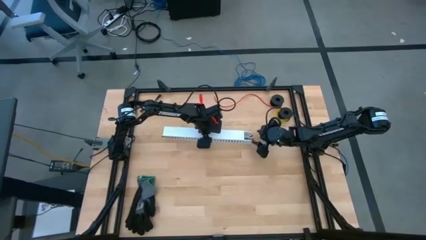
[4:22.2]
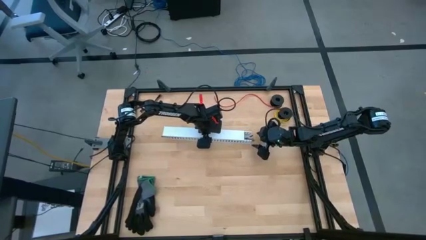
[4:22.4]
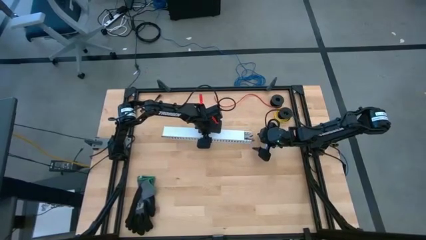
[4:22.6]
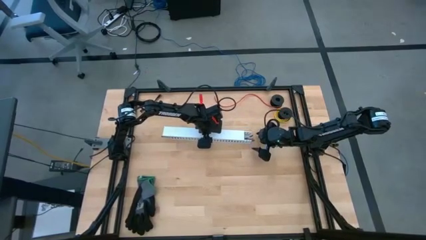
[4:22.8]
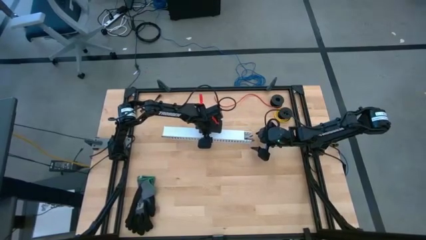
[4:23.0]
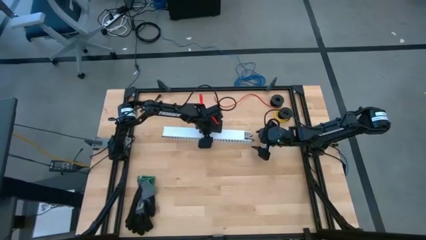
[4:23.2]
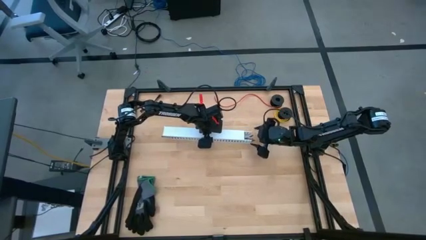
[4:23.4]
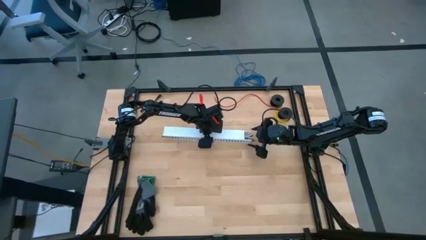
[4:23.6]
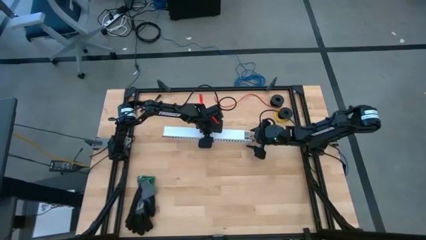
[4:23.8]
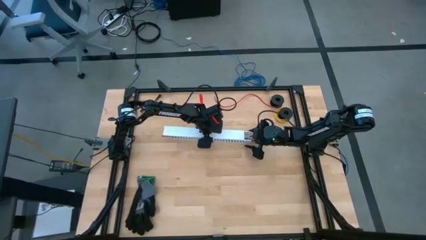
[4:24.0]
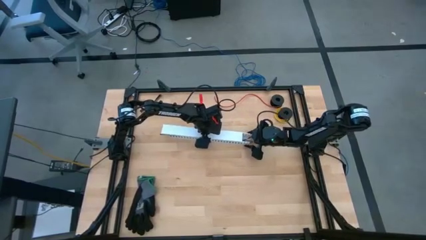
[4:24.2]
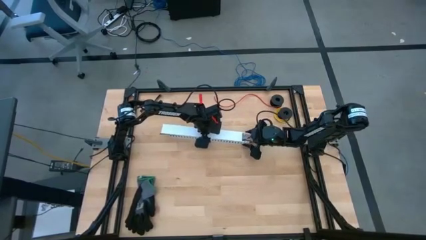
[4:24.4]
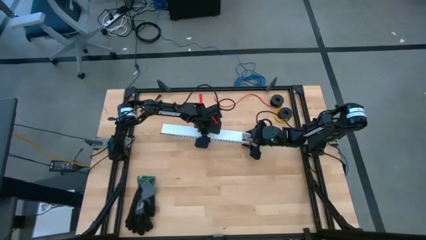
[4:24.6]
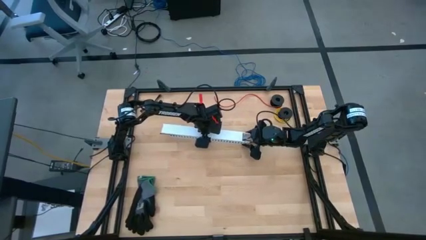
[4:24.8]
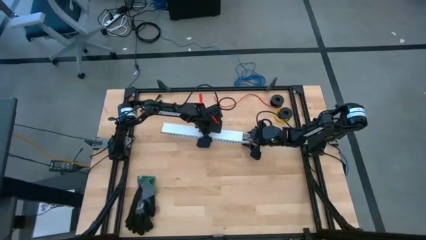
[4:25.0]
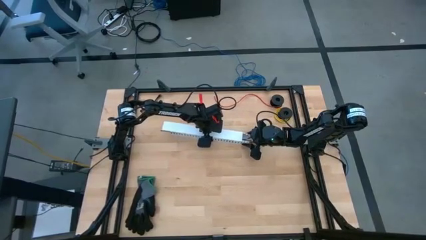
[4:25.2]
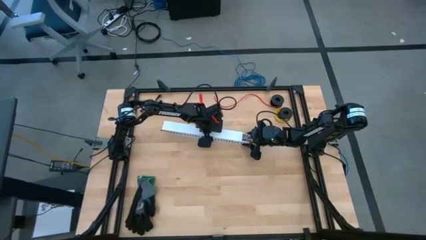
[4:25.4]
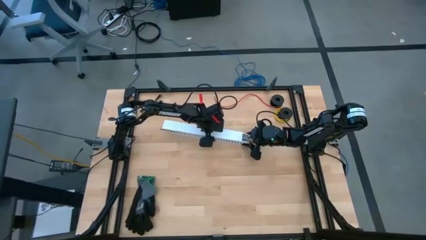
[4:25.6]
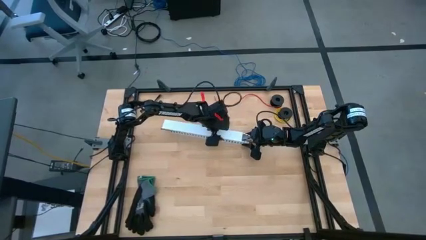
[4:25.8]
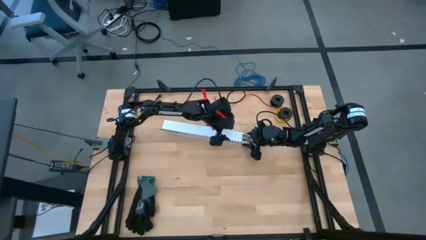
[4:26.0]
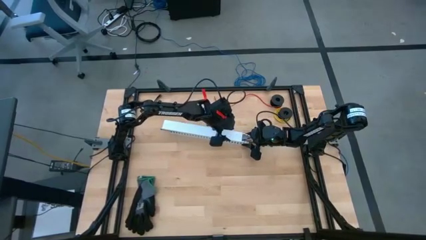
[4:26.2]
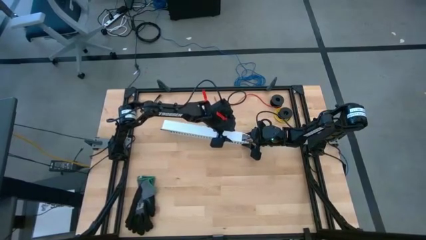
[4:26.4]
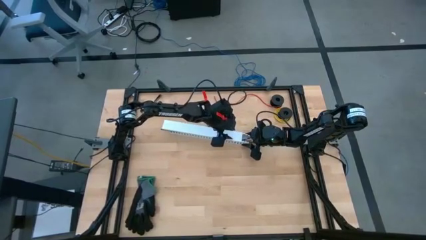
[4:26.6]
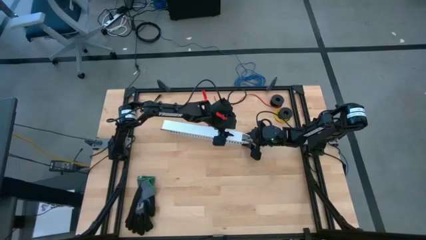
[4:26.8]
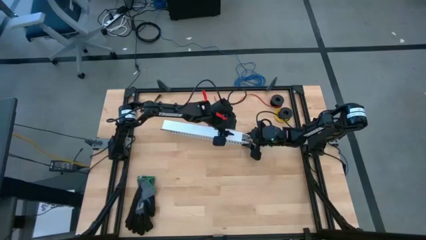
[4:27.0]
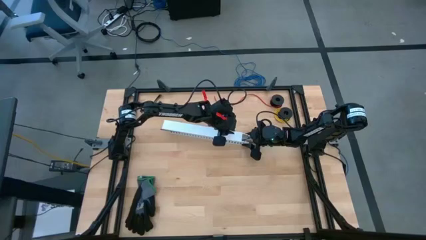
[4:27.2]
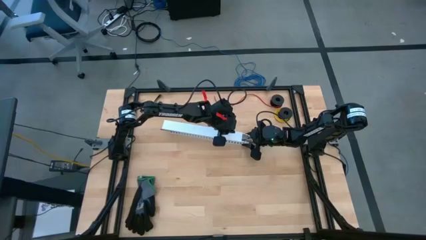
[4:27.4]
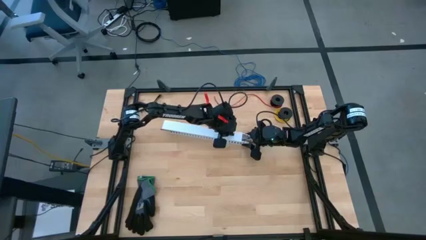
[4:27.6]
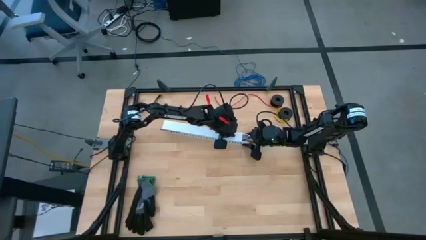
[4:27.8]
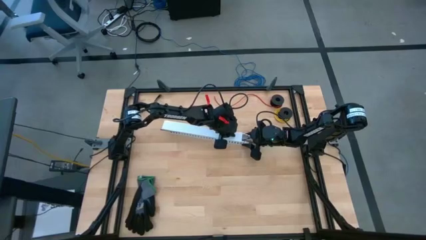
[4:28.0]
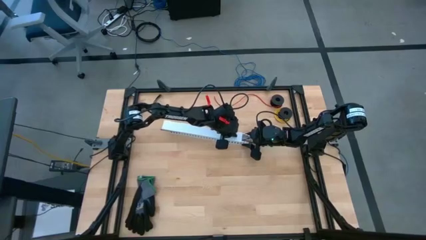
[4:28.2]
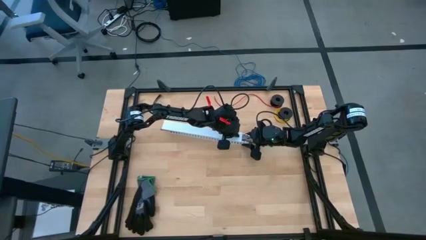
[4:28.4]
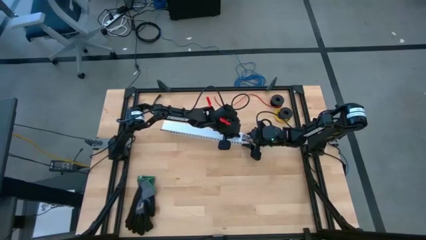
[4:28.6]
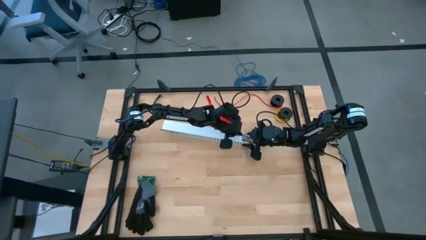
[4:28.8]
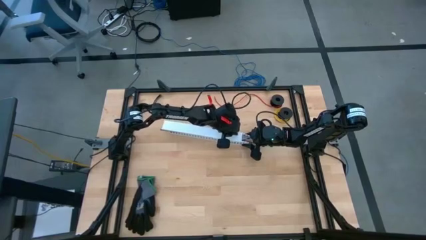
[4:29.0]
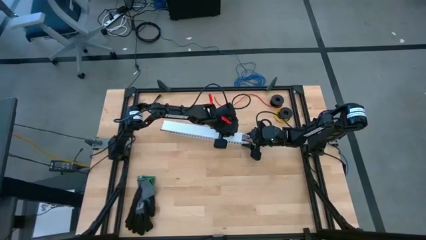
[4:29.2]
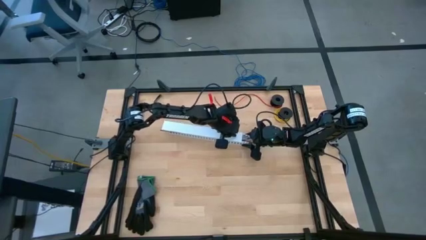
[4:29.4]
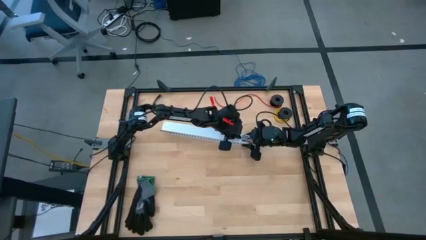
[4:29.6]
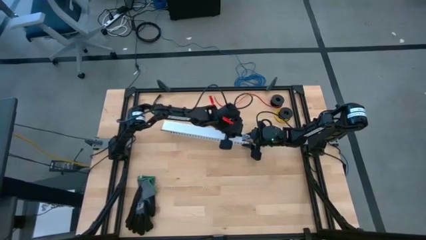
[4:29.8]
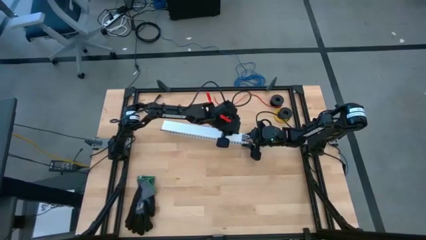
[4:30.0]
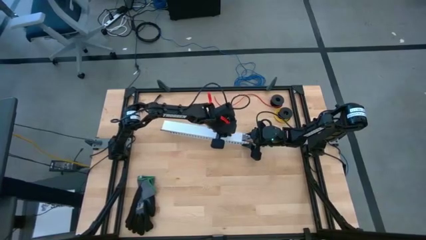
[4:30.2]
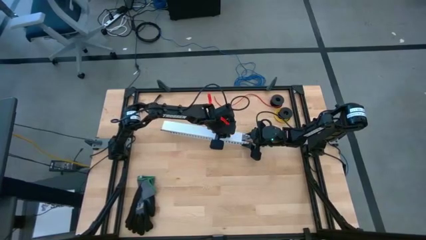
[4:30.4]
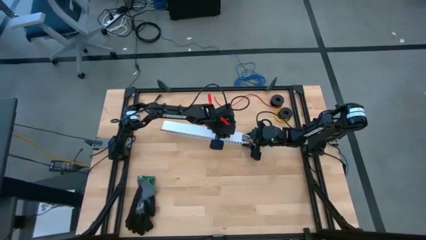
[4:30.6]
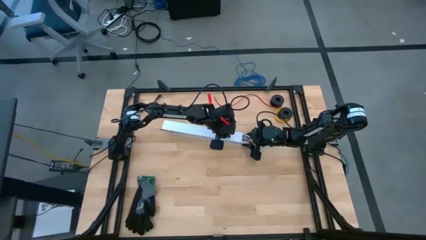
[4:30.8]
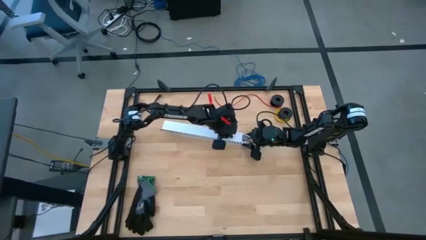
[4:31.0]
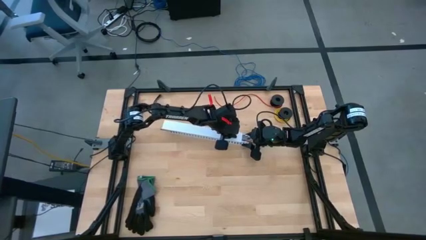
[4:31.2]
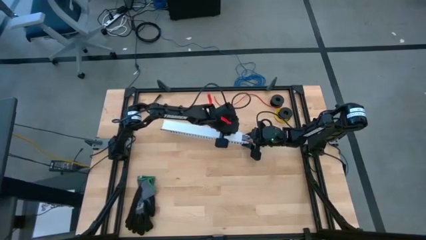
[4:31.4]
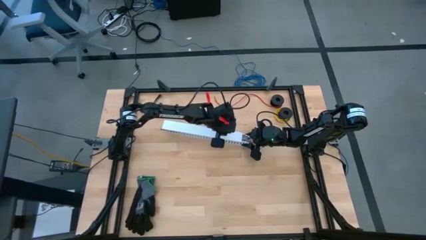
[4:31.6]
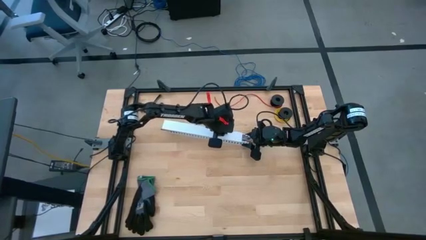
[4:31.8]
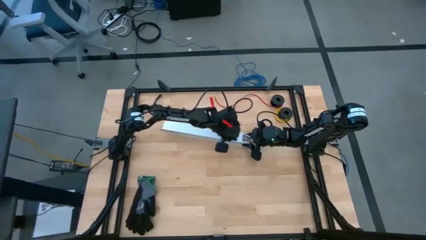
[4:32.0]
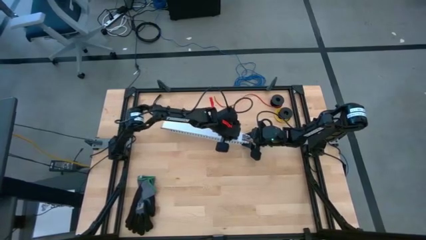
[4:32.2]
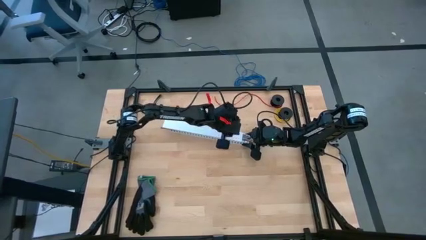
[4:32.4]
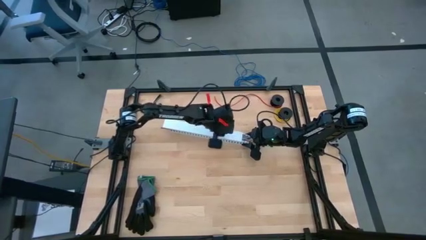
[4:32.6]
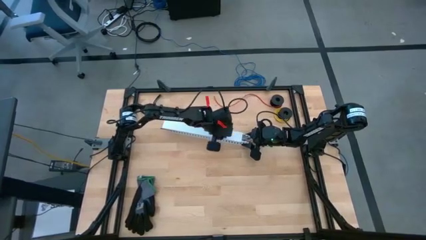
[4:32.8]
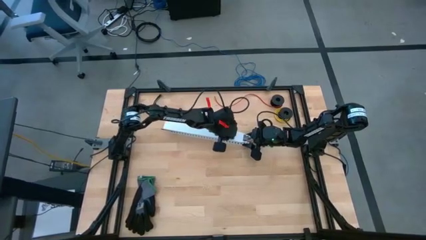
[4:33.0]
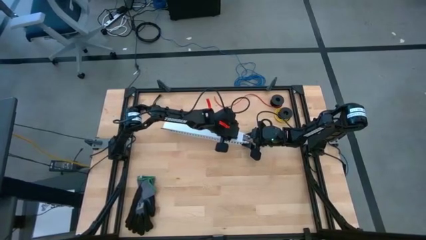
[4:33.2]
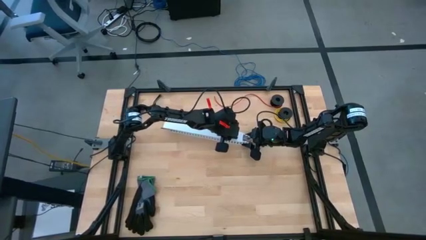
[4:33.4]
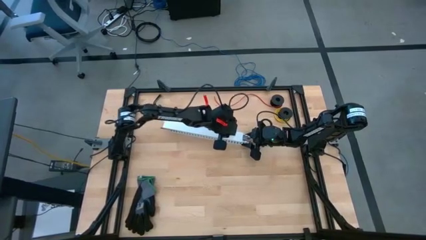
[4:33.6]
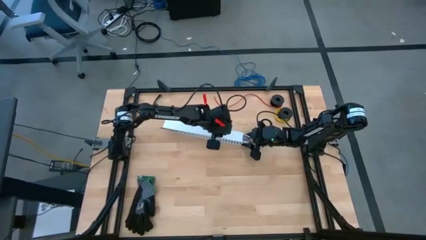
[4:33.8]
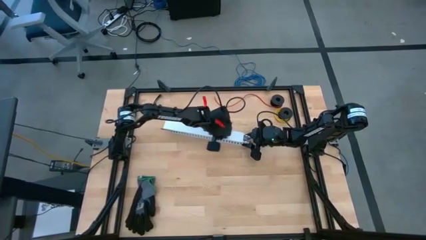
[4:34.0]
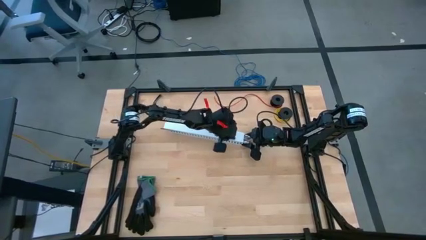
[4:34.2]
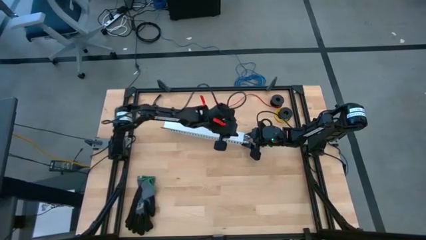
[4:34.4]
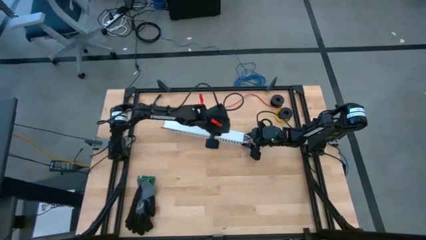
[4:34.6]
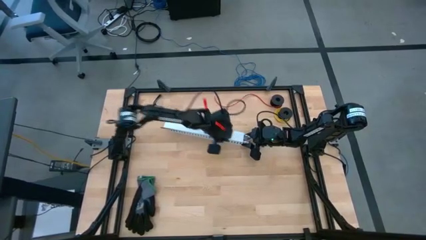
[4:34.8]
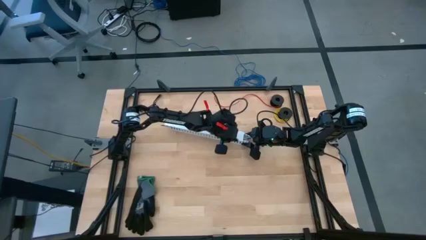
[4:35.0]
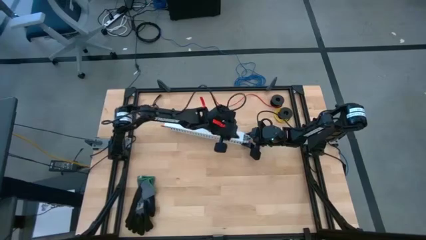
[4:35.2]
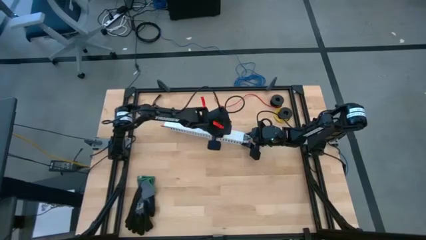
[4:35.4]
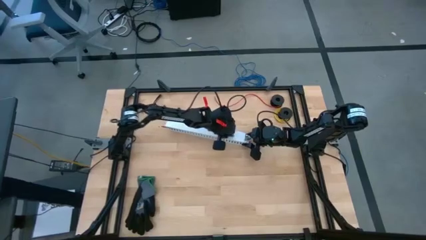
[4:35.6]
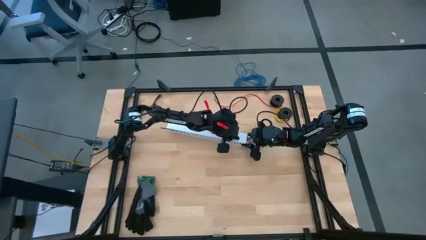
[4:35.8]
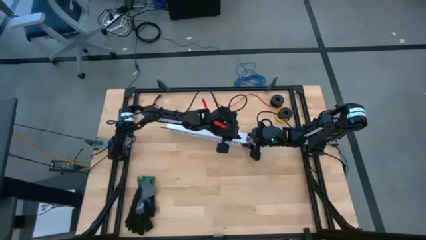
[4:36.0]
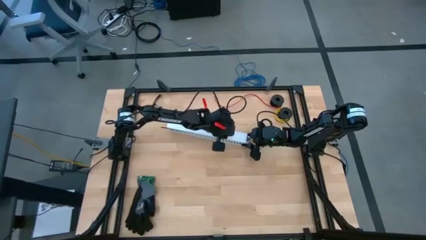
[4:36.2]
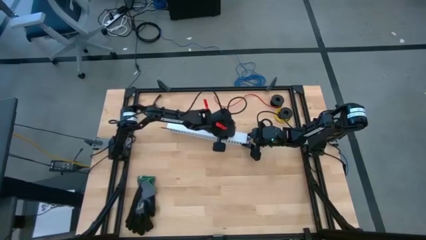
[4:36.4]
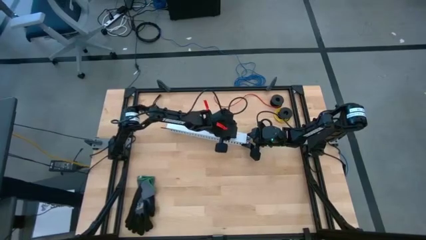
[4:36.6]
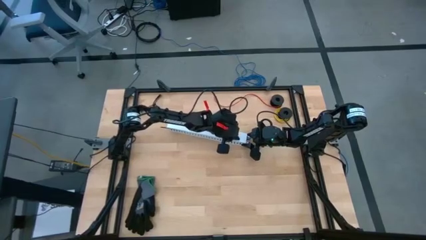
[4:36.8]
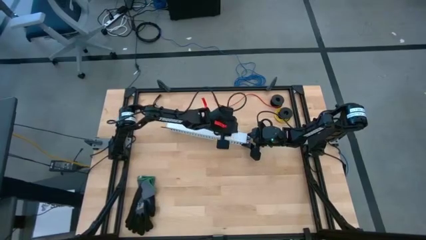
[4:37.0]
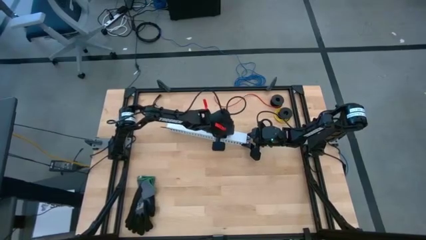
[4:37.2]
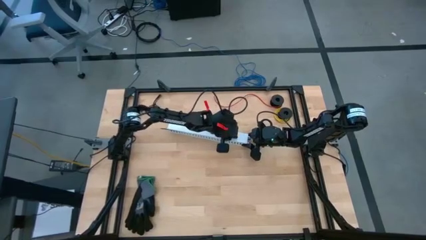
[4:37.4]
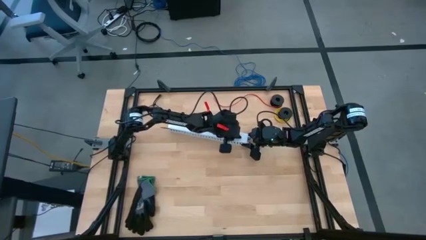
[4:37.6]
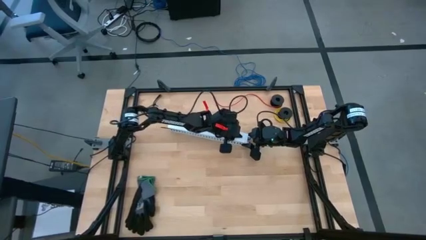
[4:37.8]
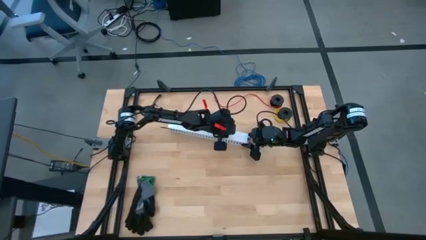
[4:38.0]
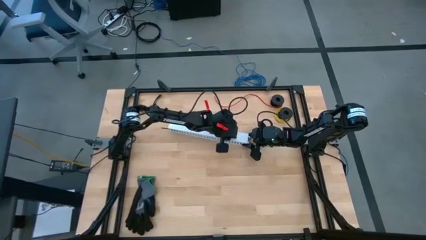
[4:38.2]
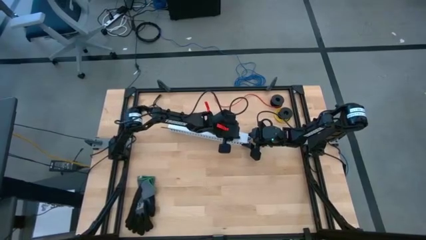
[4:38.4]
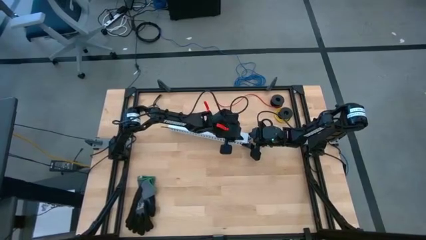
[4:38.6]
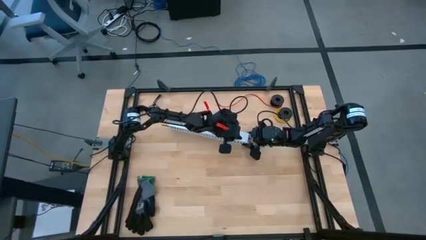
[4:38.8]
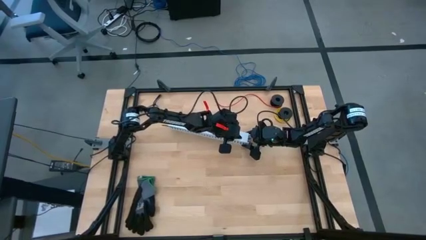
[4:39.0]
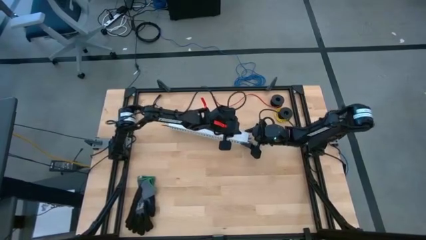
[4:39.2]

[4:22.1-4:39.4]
Task: Ziptie cables
Close the cable duct
